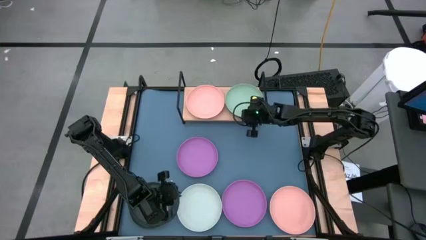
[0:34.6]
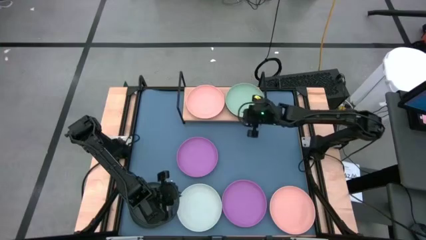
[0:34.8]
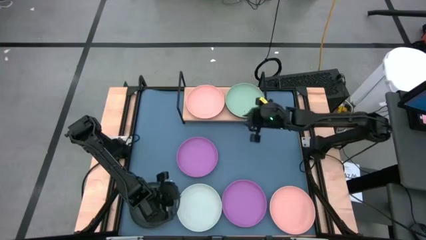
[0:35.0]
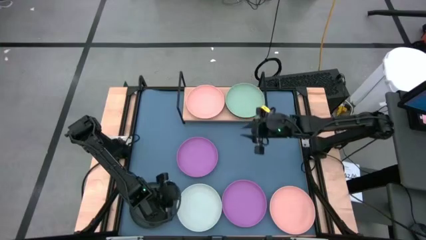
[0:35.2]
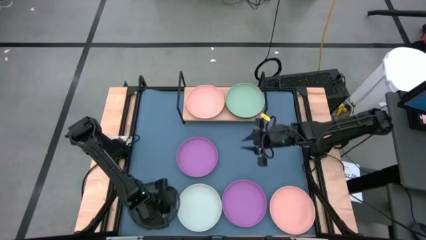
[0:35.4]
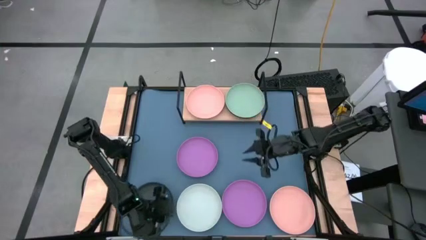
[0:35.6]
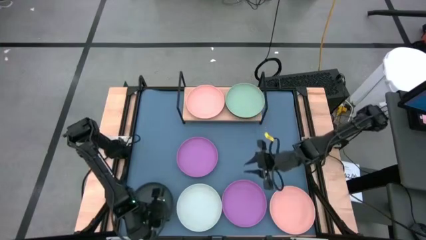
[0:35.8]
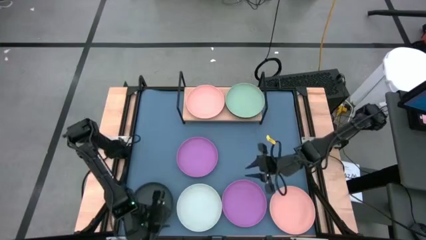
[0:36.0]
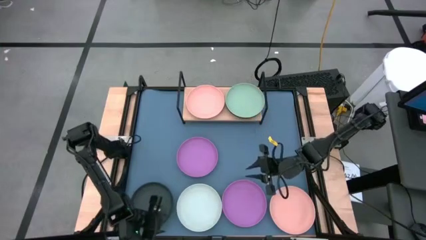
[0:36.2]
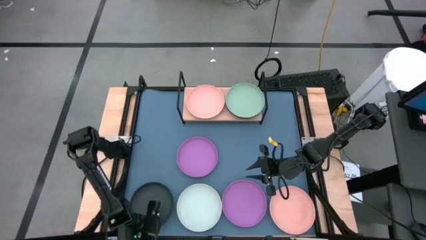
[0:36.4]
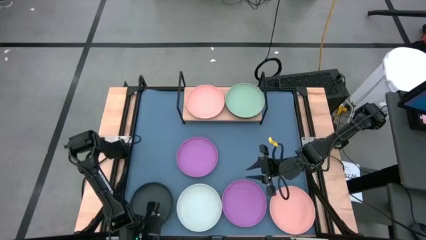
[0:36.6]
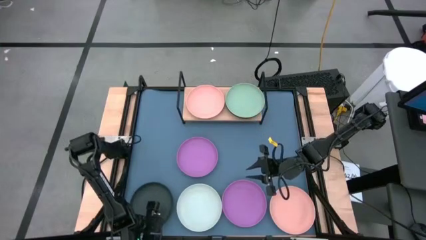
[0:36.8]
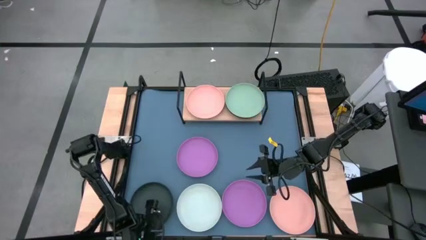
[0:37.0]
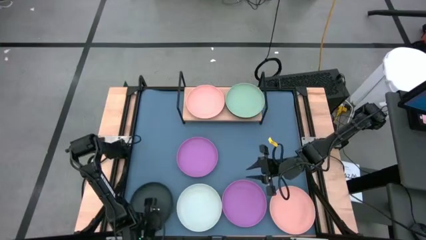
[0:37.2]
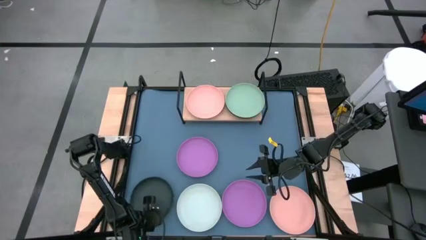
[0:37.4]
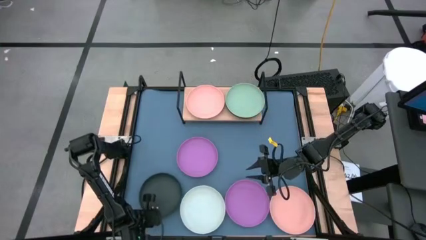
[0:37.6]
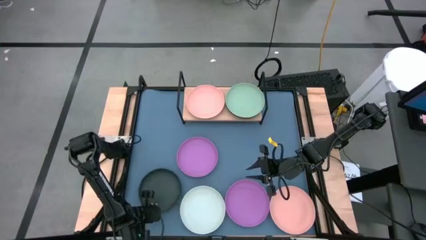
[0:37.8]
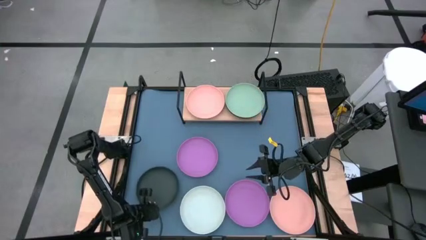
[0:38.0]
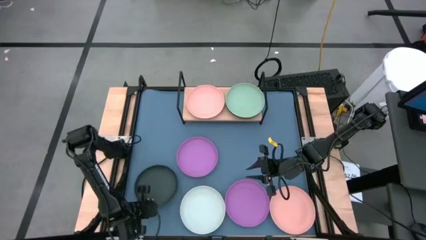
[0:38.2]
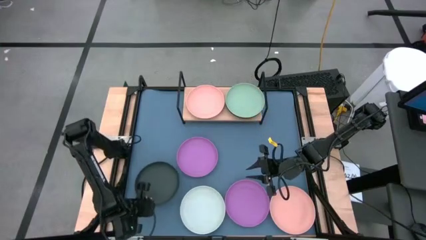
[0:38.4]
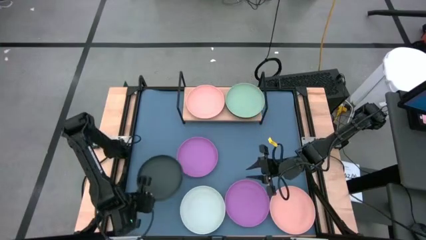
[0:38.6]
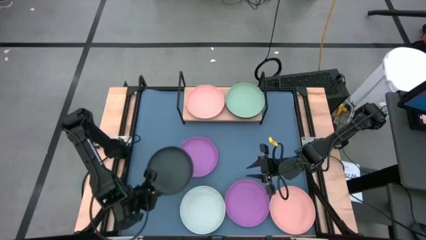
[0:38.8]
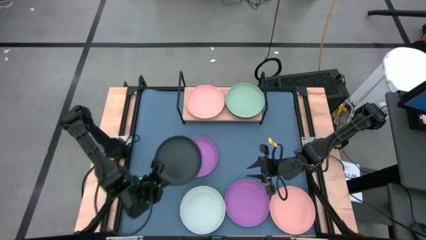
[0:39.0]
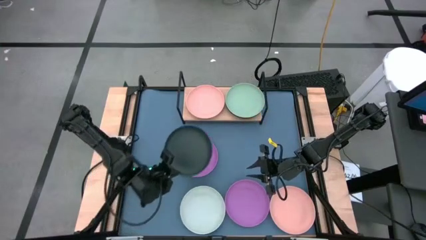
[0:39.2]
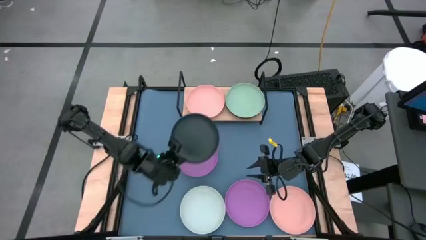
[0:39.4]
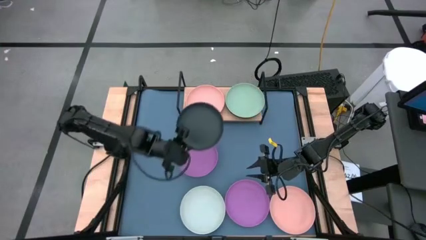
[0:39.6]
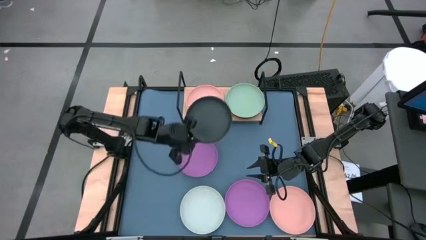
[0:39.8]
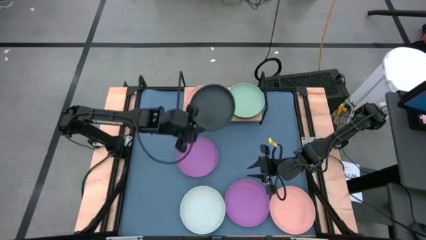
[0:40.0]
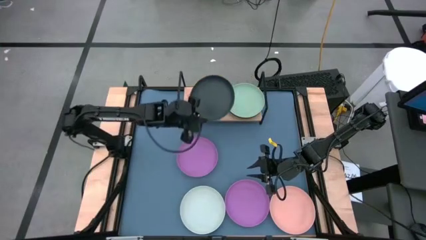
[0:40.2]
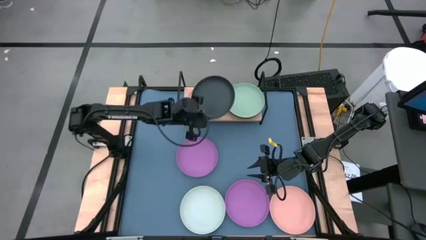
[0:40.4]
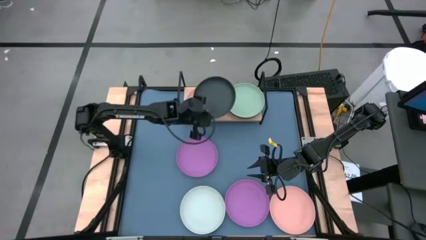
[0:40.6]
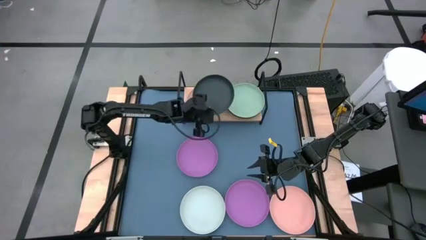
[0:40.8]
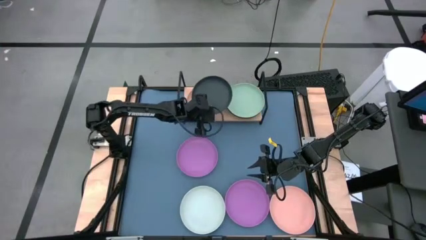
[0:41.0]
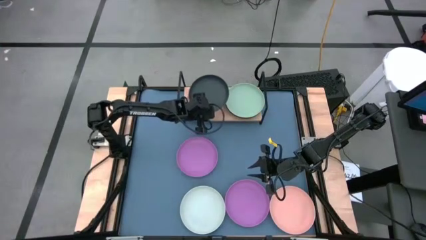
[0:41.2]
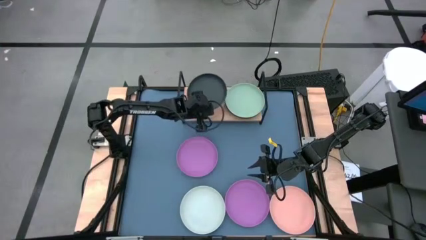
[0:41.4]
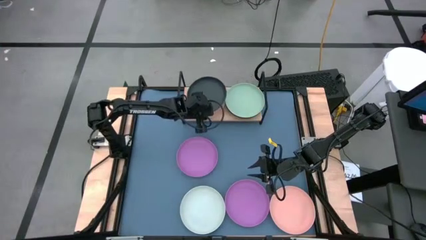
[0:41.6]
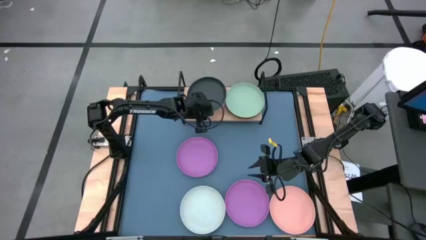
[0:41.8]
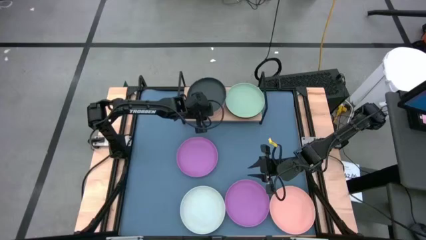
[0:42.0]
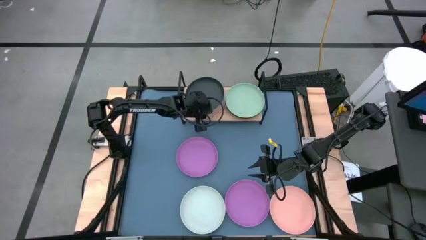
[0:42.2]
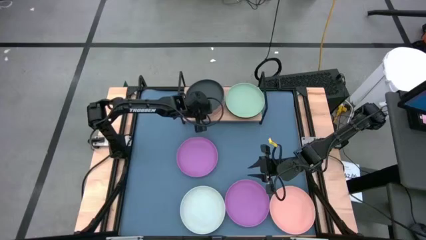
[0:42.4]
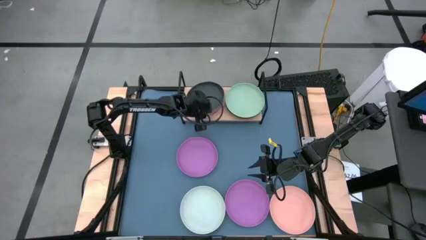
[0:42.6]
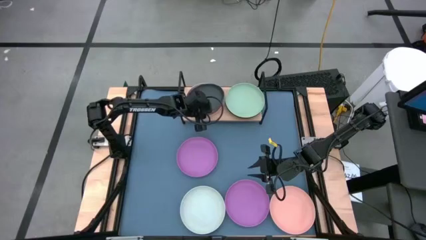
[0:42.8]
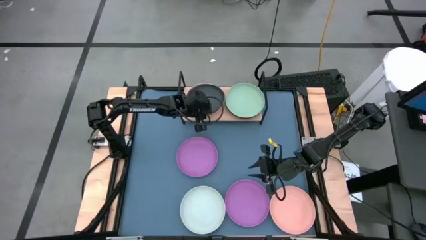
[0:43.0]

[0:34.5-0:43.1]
Task: Place and stack plates onto a shelf
Stack the black bowl on the pink bowl

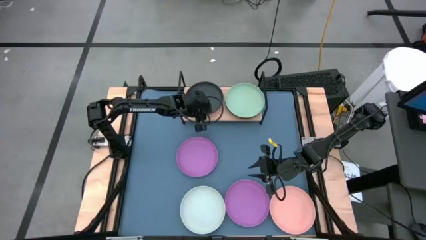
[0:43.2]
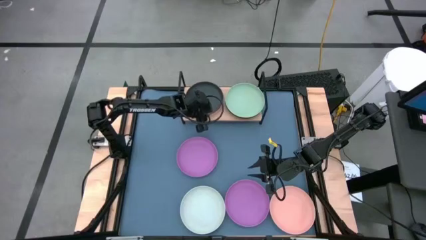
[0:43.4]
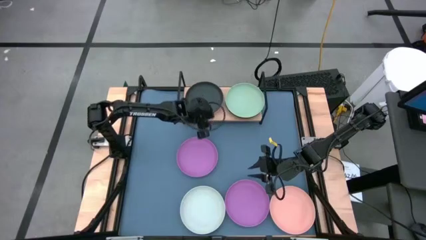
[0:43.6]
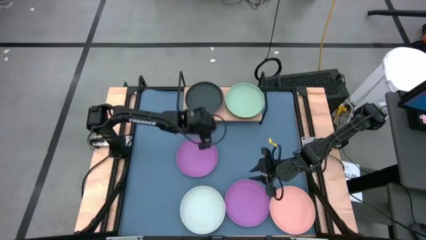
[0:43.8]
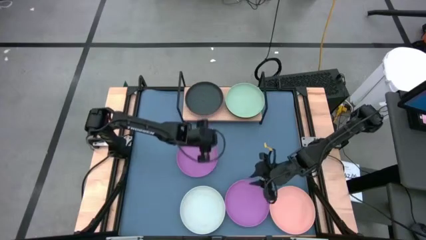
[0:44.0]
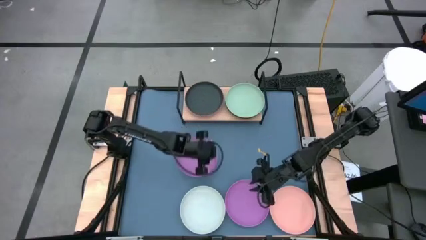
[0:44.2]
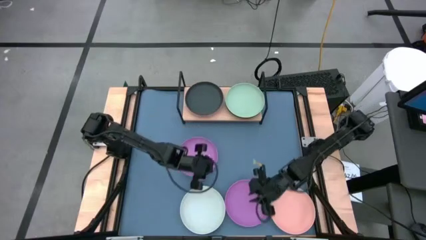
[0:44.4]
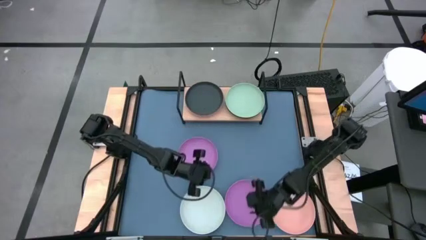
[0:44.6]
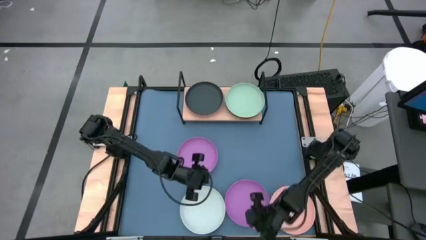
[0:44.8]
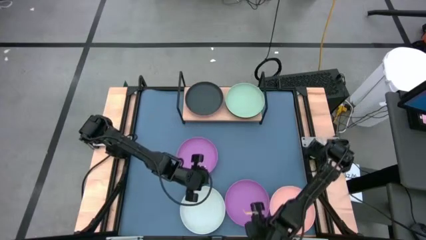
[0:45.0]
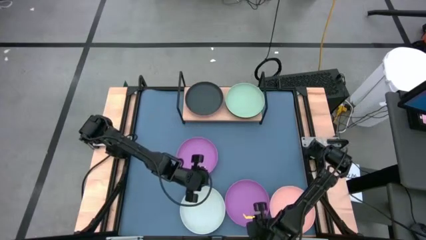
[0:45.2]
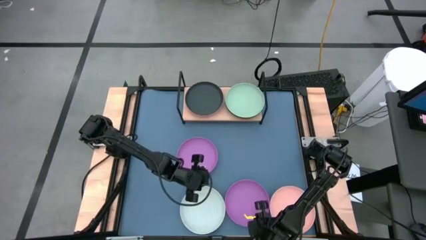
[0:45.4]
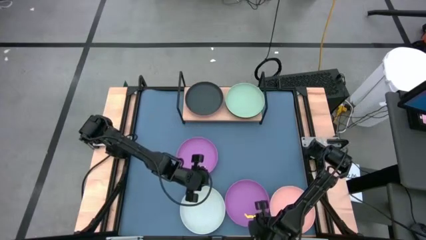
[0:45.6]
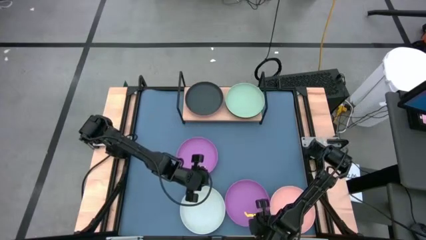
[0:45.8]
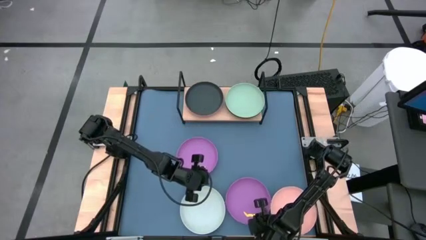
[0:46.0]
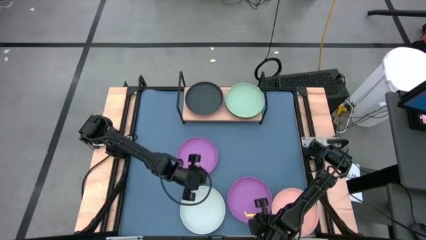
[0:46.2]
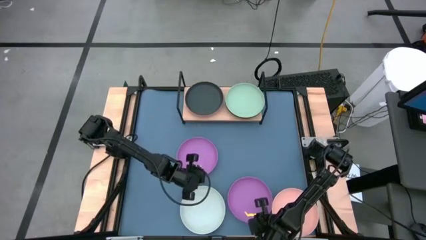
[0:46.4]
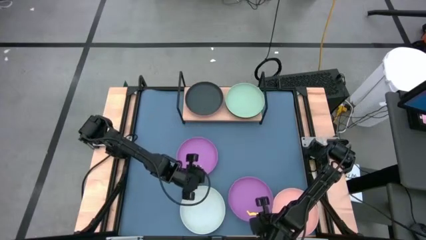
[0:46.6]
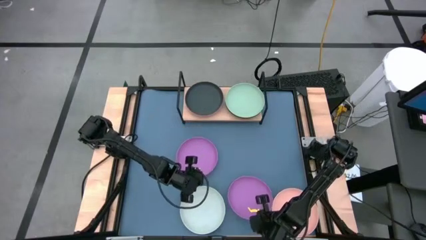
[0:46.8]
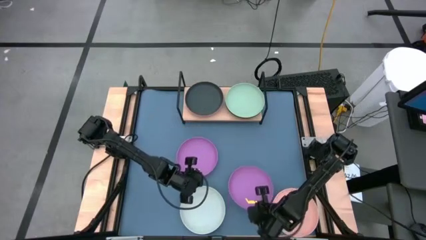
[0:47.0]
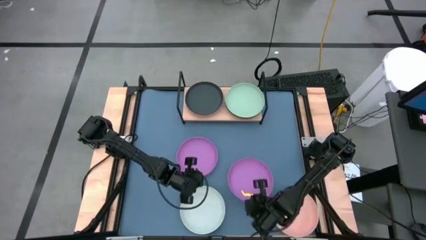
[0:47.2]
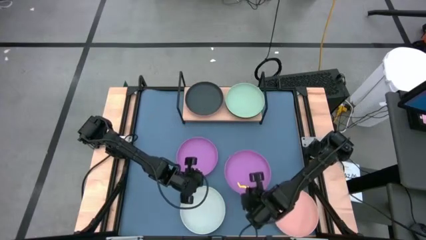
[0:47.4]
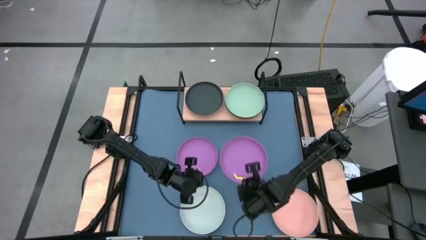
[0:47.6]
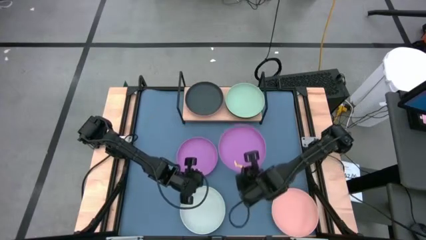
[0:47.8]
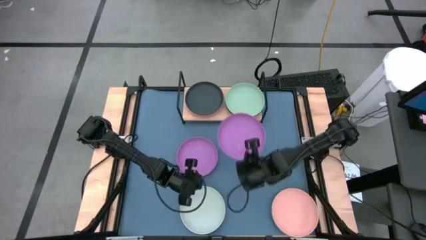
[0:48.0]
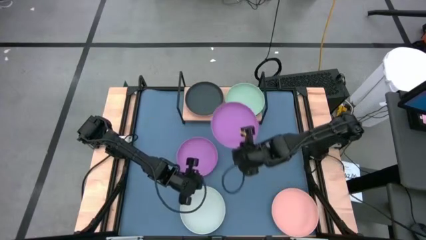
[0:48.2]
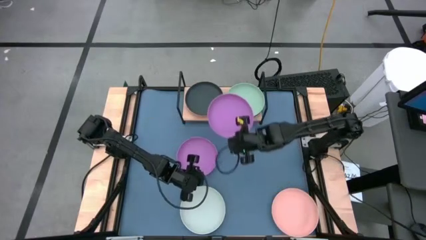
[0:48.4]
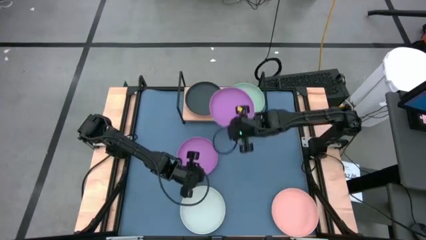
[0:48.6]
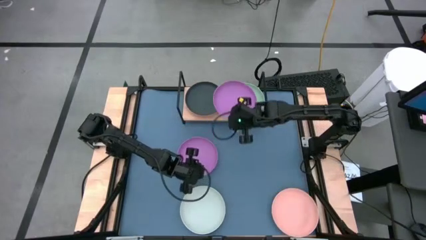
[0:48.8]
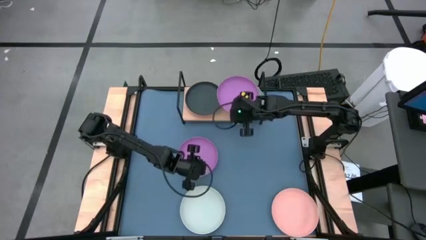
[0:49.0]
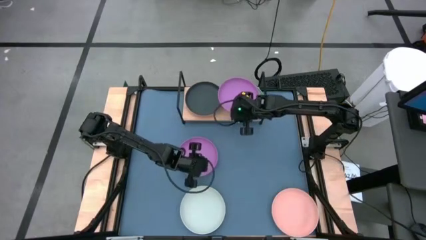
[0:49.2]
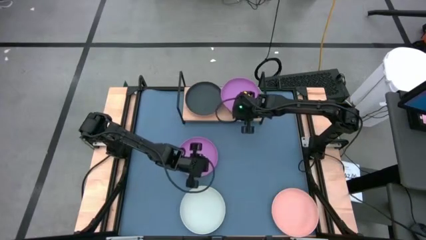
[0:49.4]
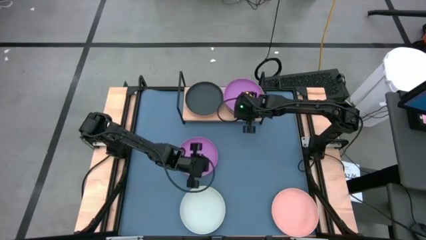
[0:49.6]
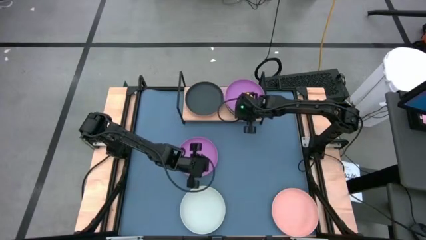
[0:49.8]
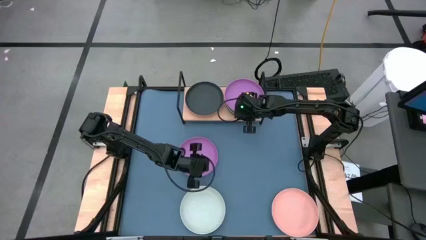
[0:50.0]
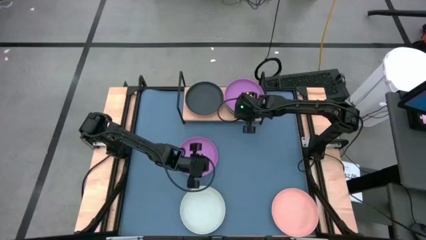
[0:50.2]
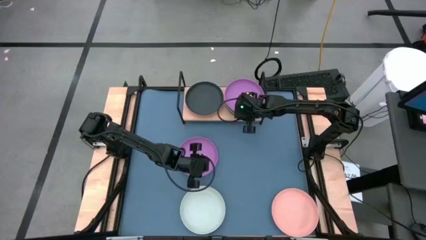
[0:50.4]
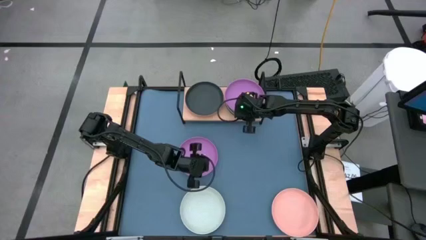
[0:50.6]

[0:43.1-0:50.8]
Stack the purple bowl on the green bowl
